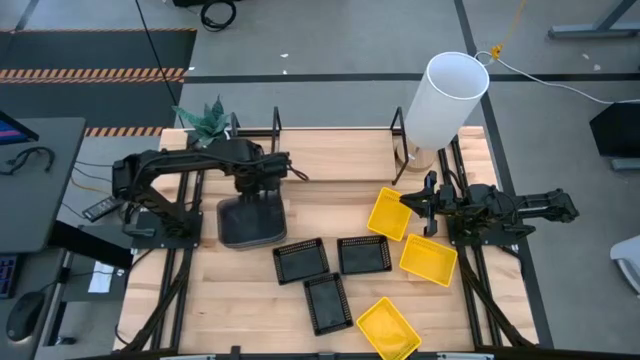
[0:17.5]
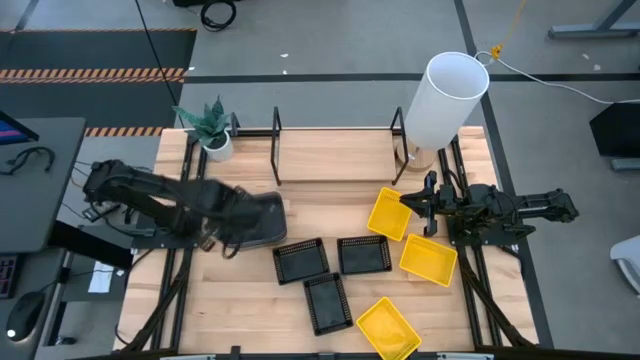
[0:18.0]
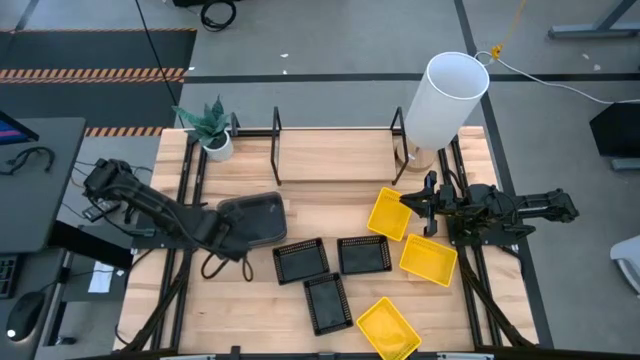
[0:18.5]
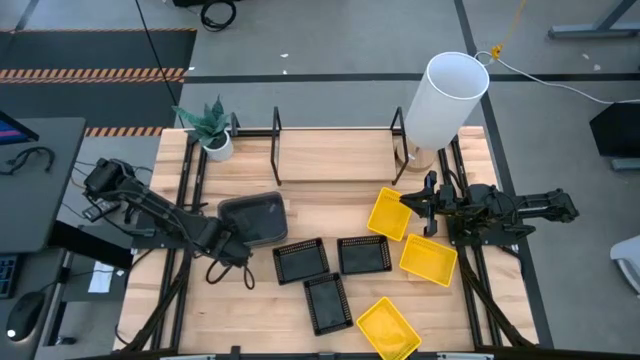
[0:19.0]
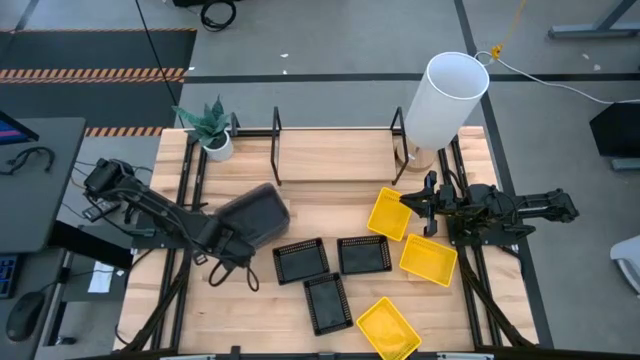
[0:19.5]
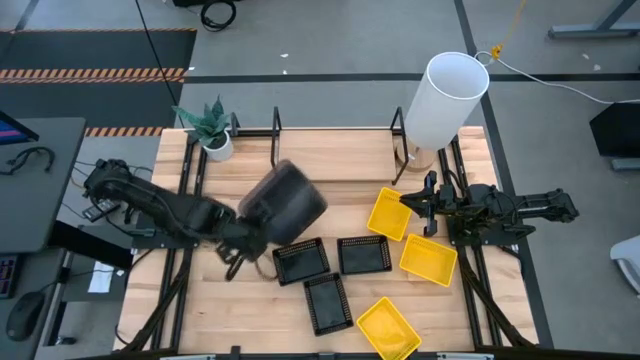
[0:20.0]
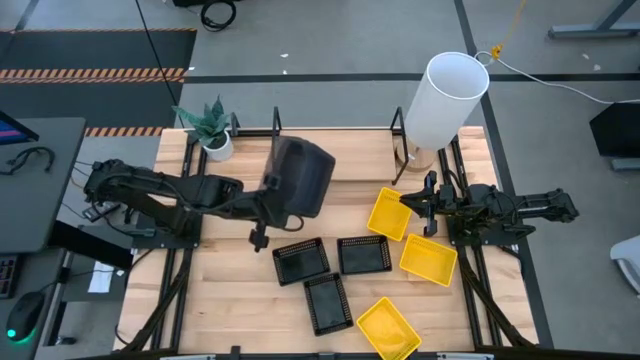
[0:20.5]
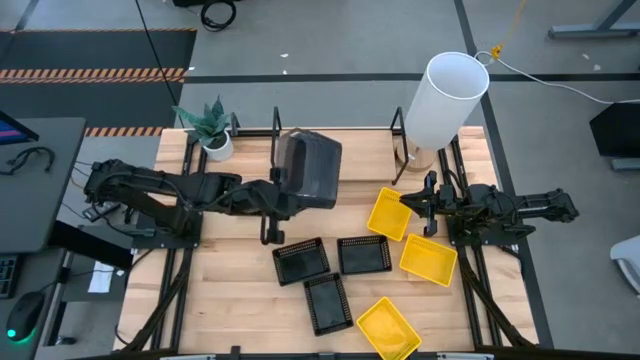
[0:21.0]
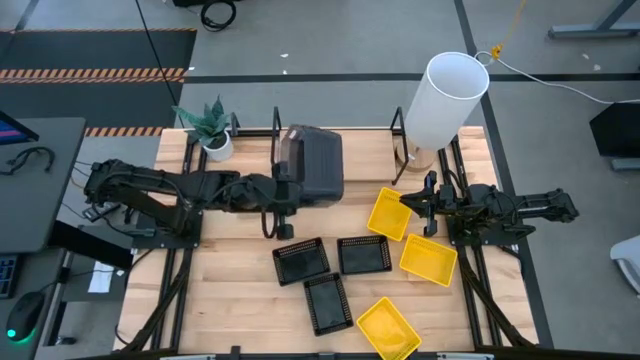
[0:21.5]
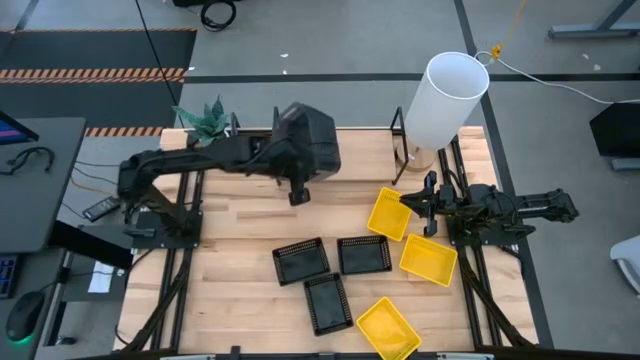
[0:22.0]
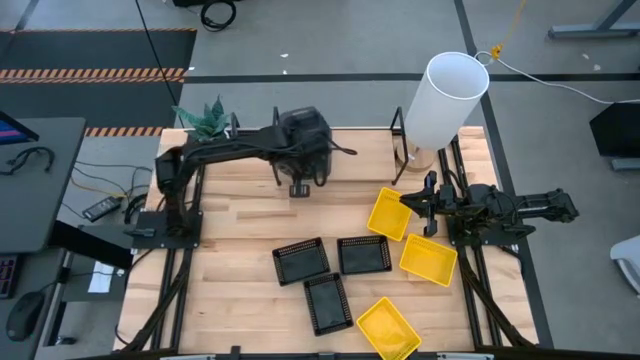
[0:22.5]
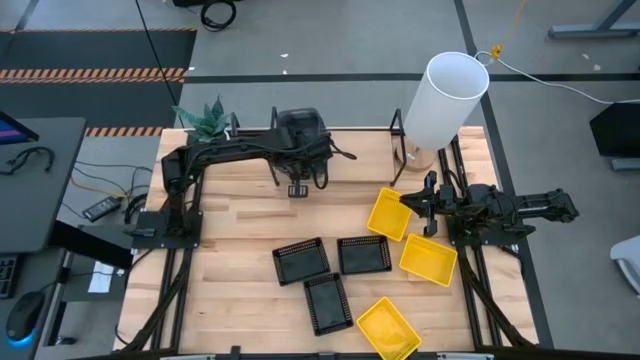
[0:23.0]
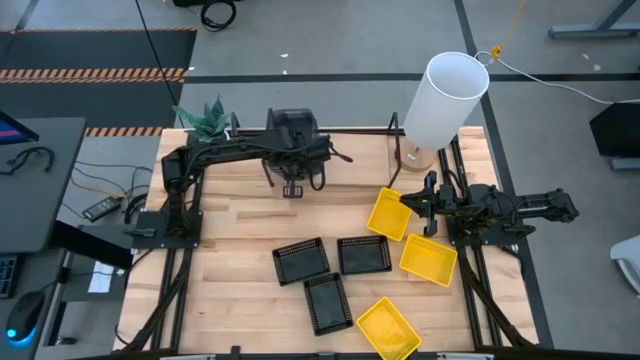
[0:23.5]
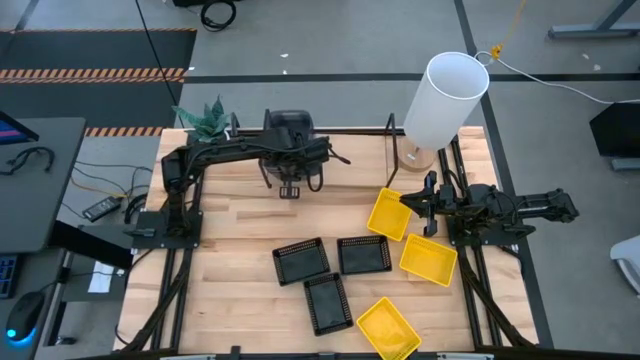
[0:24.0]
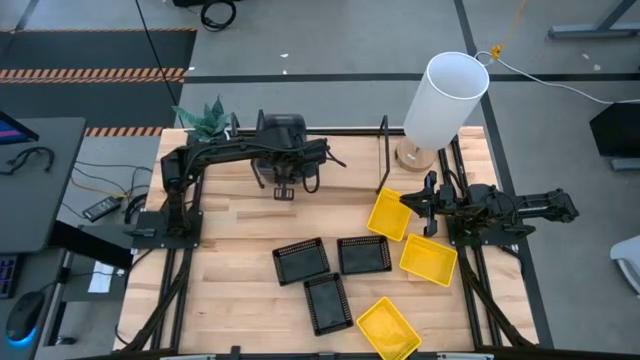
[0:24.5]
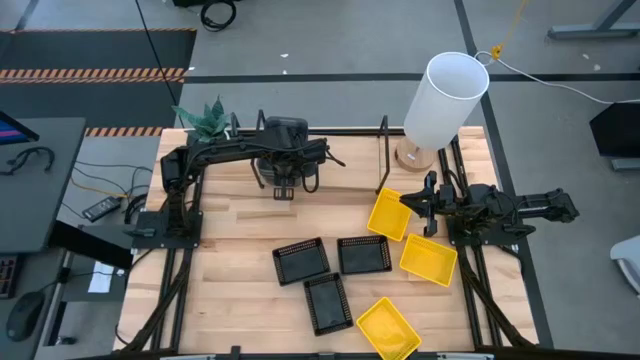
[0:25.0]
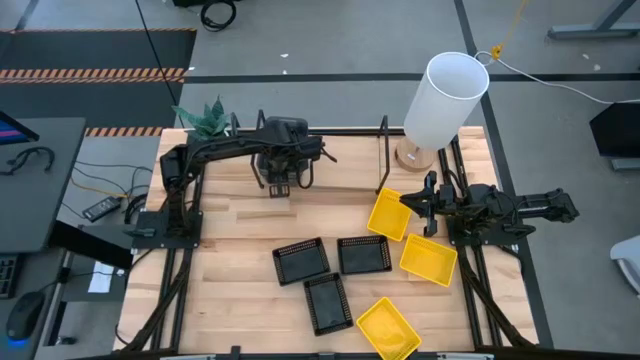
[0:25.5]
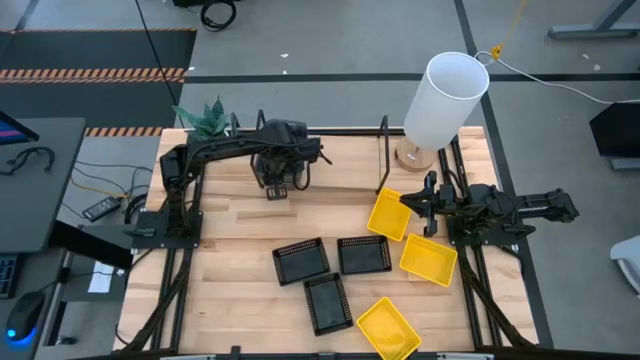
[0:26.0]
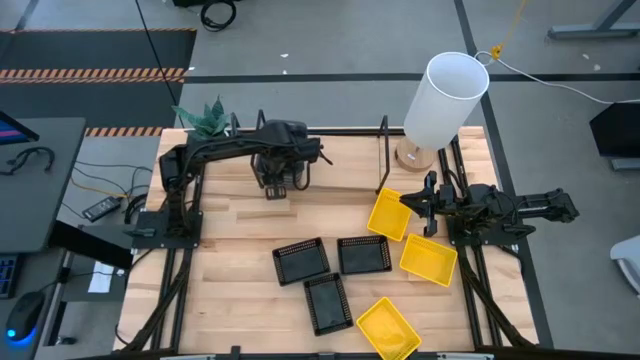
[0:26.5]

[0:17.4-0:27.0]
Task: Stack baskets on shelf by color
Put the stacked black bins on the shelf

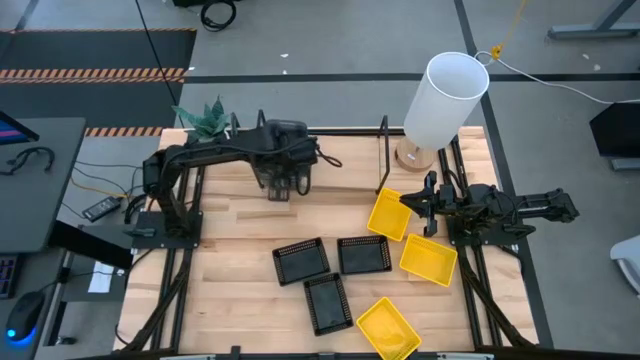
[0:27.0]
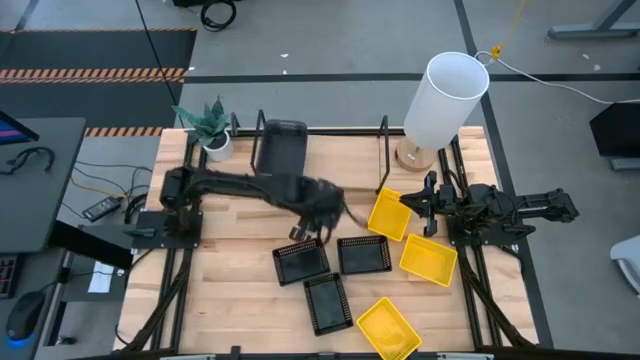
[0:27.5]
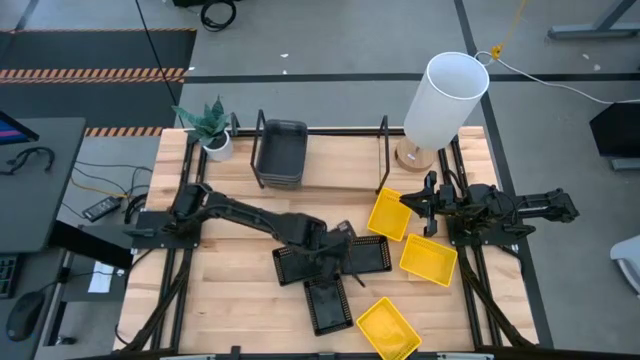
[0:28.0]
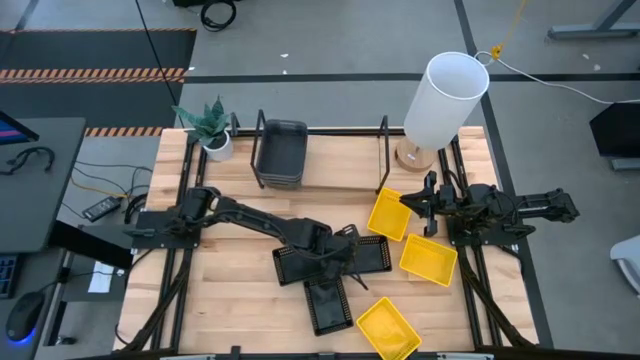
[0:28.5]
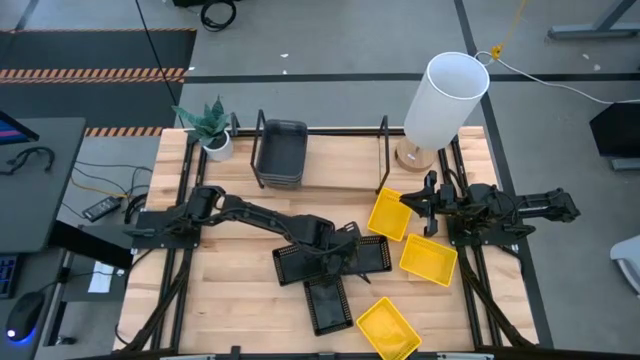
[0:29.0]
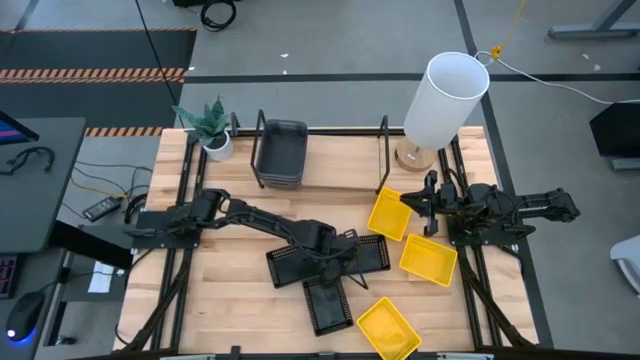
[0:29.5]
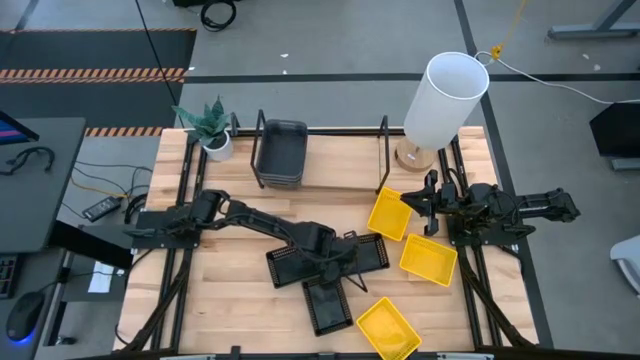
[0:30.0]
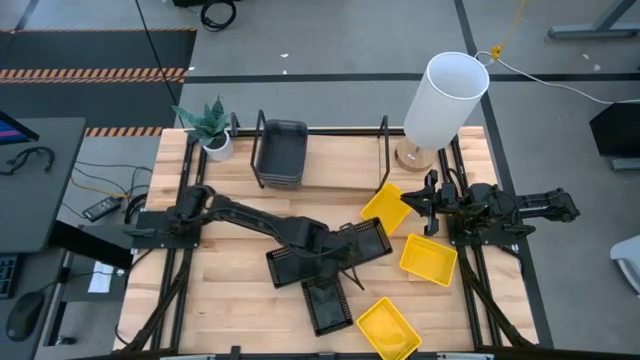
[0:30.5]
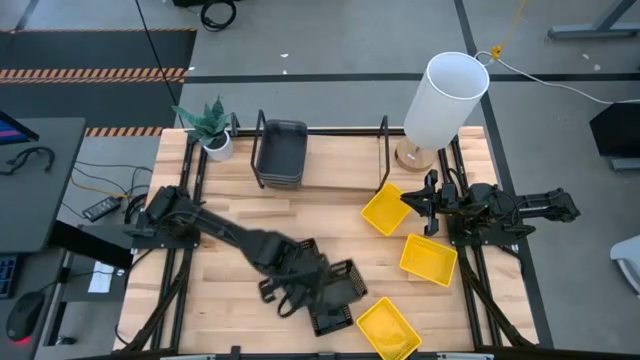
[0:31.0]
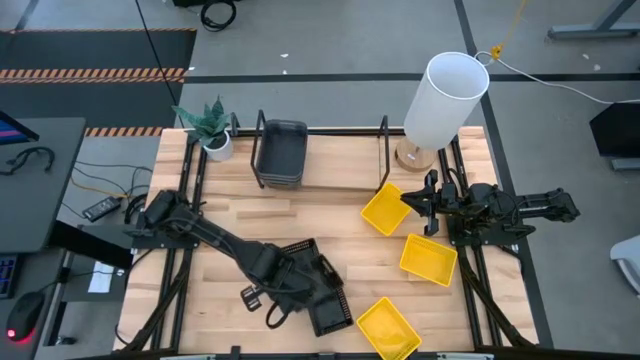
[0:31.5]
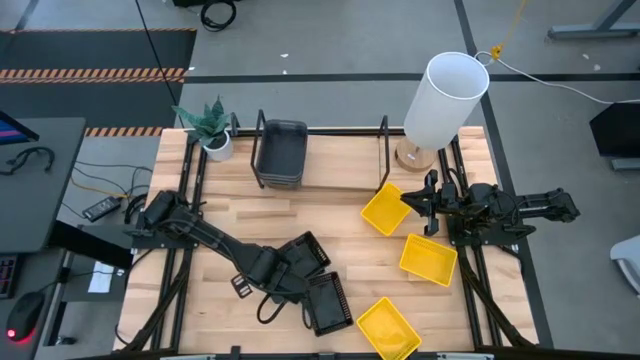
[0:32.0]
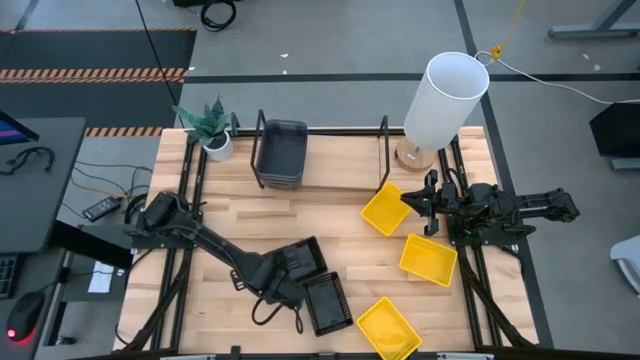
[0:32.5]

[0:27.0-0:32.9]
Stack the top right black basket on the top left black basket

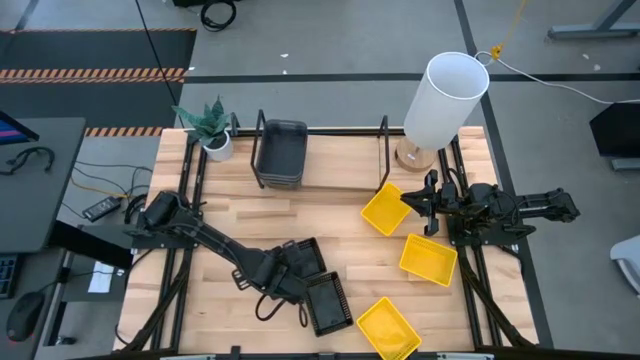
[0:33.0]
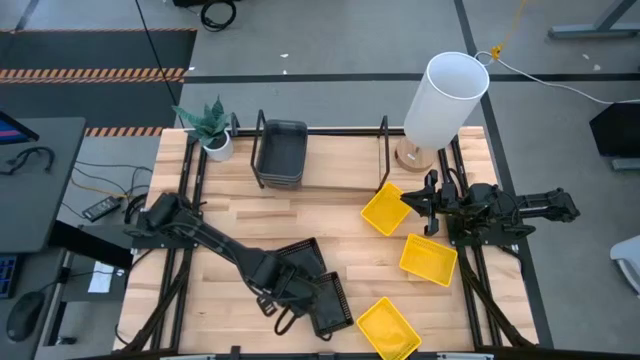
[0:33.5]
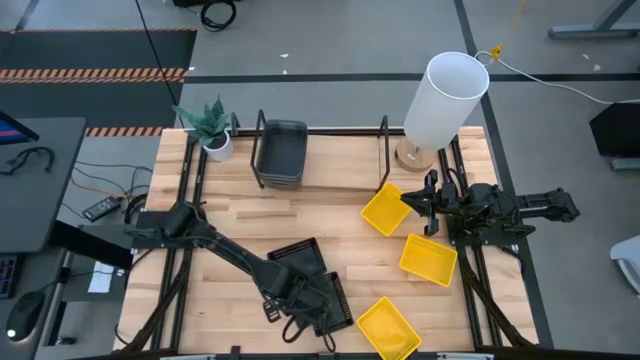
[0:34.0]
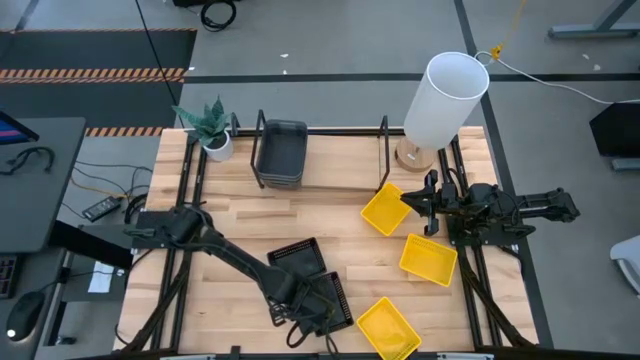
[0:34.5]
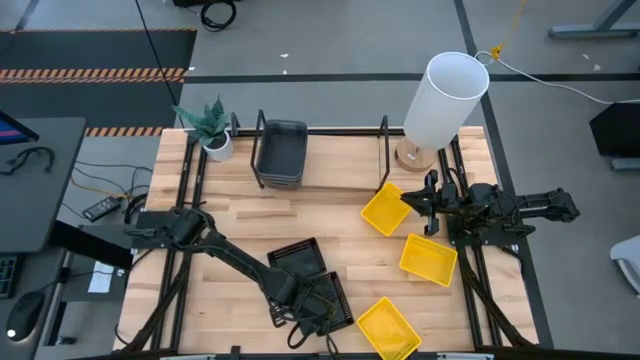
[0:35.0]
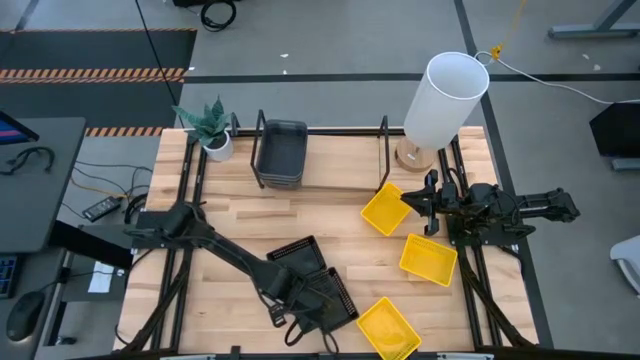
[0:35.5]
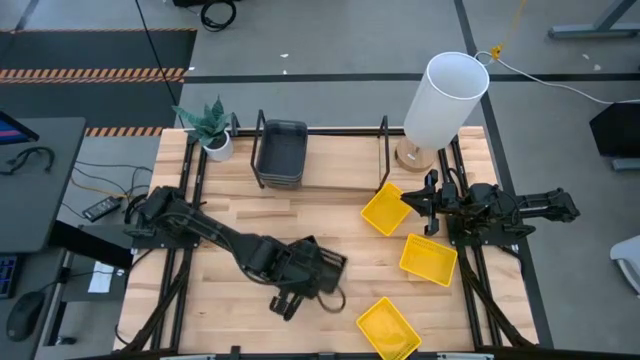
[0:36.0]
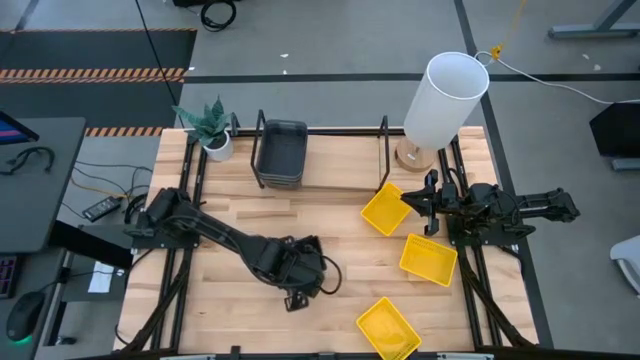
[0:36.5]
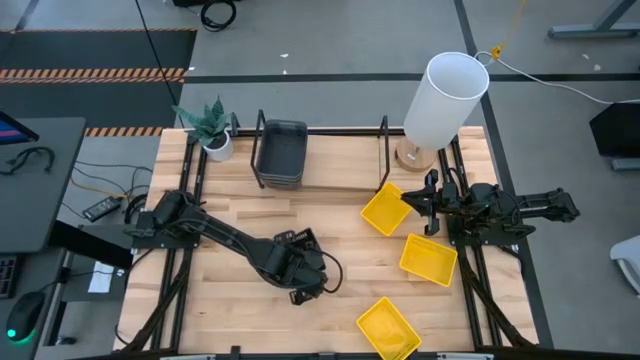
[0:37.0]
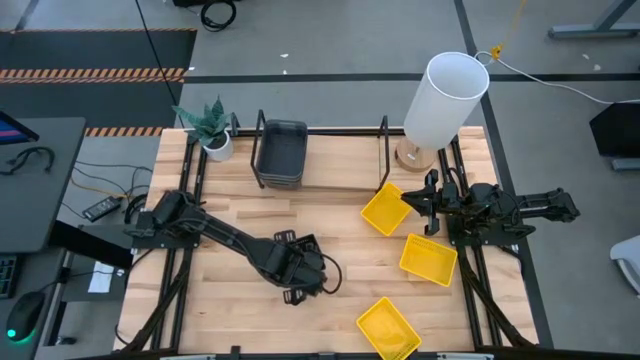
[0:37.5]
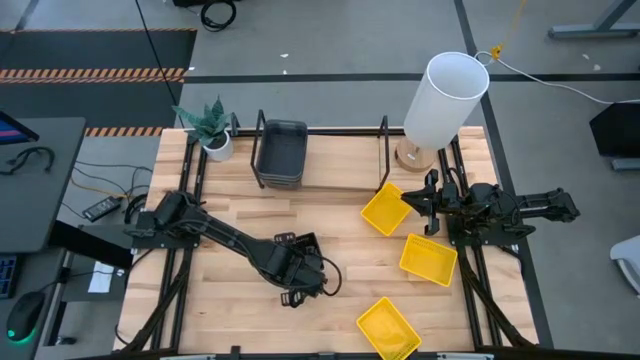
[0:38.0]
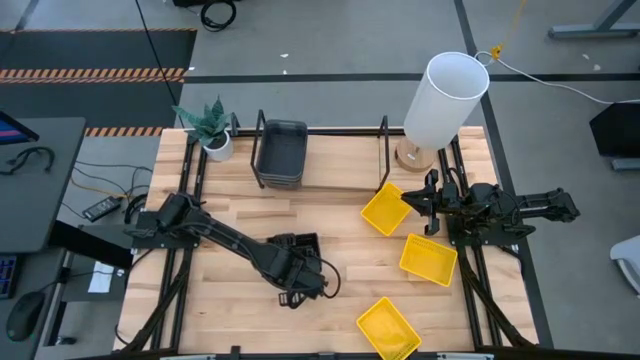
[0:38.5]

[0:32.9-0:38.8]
Stack the bottom black basket on the top black baskets
